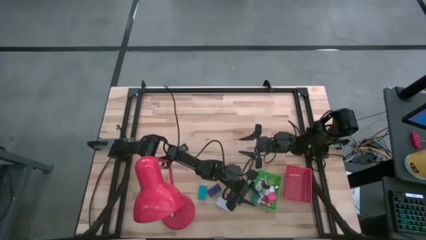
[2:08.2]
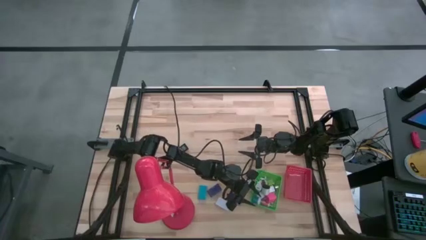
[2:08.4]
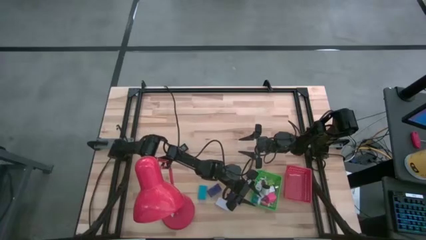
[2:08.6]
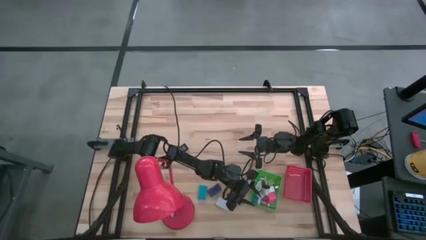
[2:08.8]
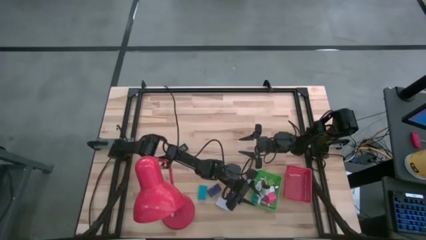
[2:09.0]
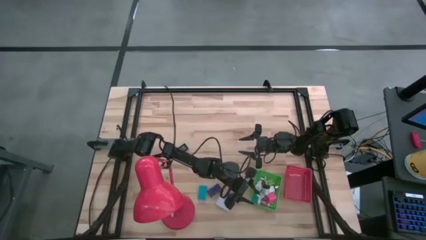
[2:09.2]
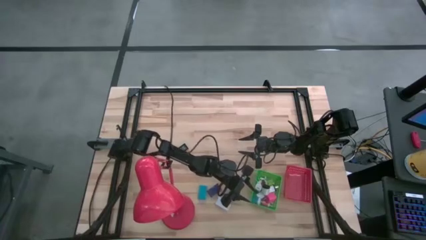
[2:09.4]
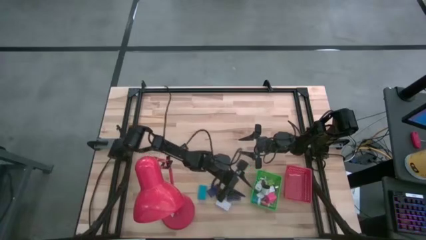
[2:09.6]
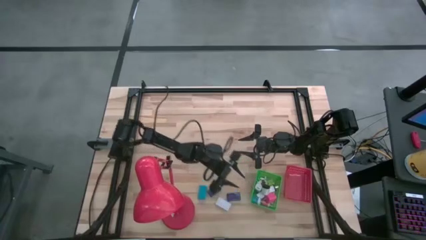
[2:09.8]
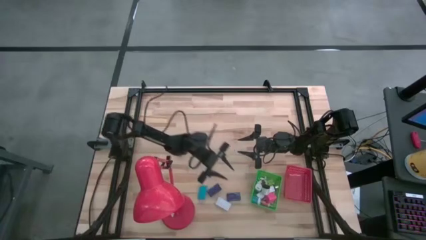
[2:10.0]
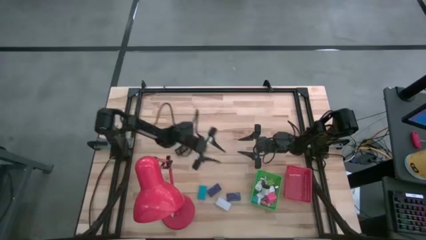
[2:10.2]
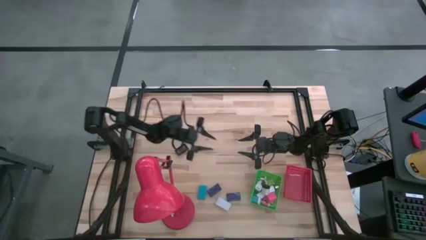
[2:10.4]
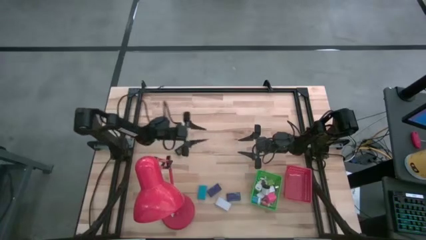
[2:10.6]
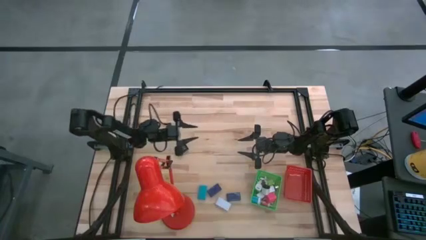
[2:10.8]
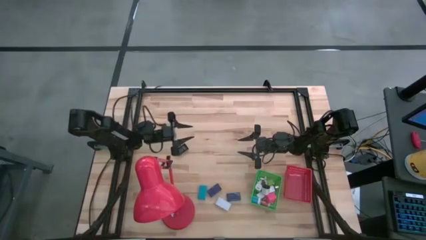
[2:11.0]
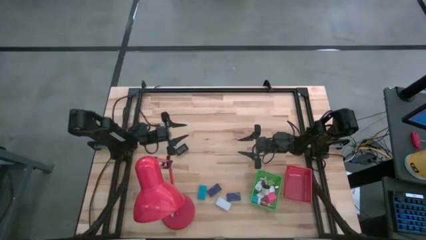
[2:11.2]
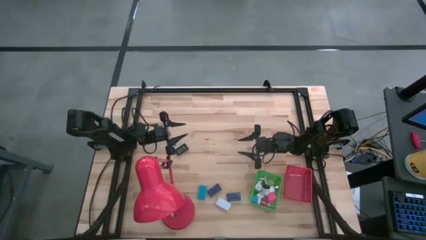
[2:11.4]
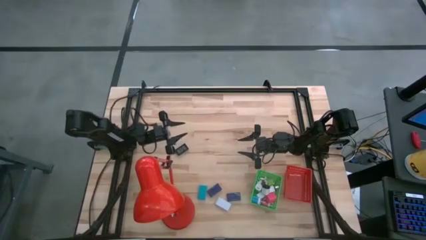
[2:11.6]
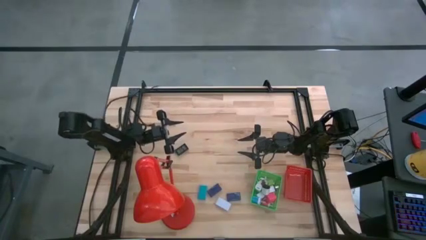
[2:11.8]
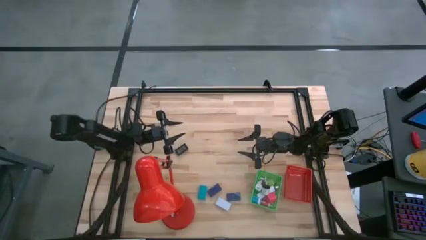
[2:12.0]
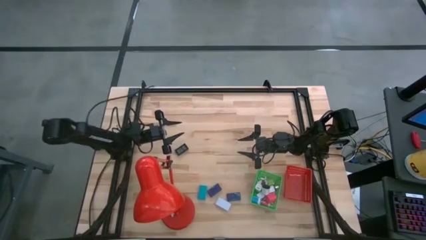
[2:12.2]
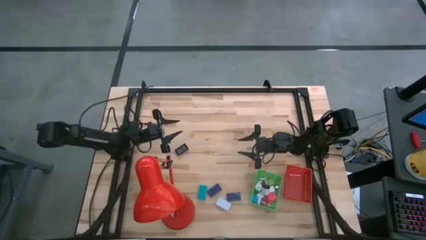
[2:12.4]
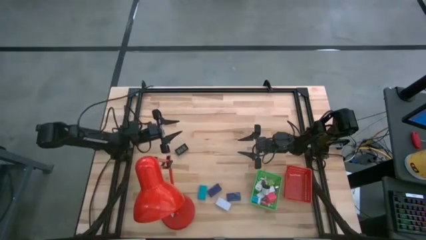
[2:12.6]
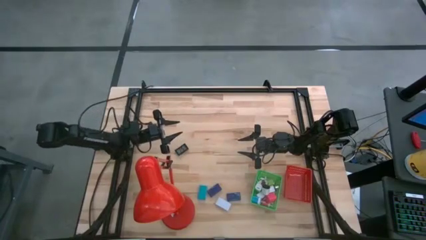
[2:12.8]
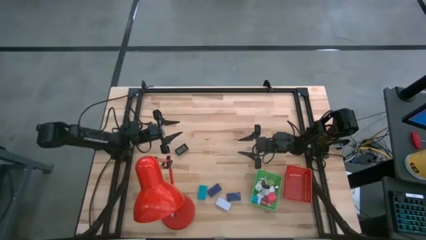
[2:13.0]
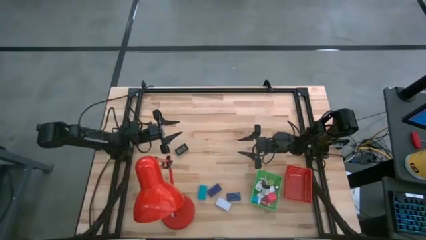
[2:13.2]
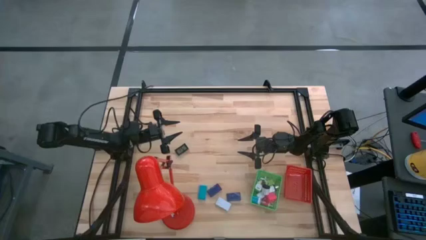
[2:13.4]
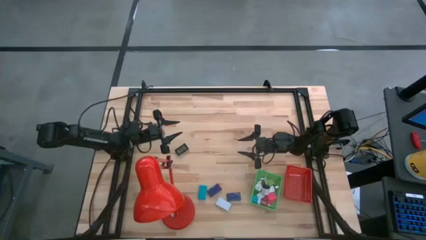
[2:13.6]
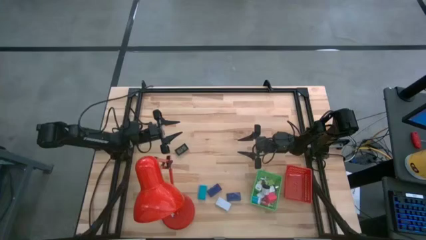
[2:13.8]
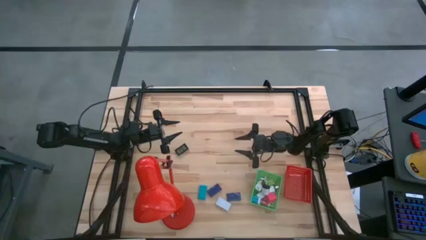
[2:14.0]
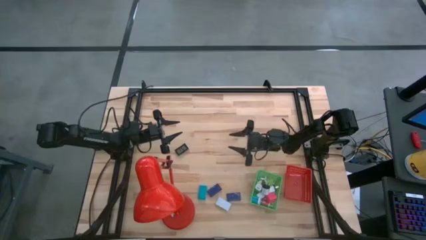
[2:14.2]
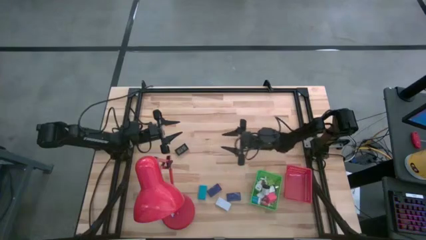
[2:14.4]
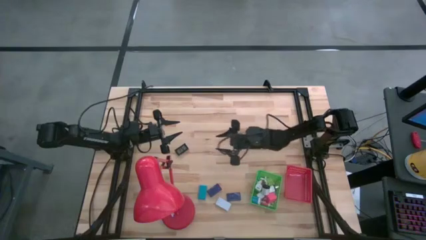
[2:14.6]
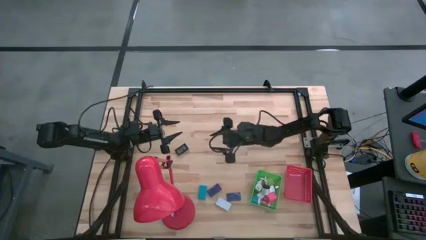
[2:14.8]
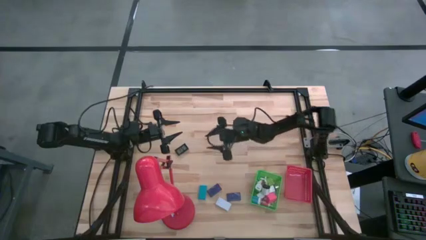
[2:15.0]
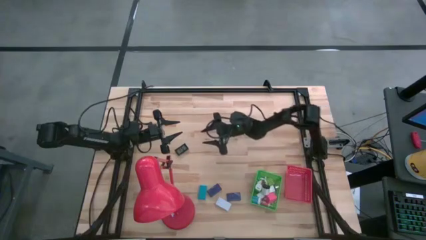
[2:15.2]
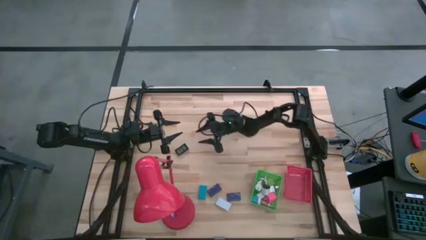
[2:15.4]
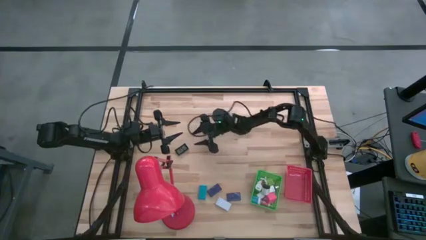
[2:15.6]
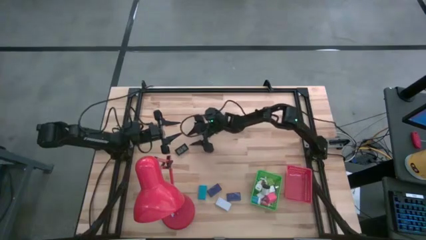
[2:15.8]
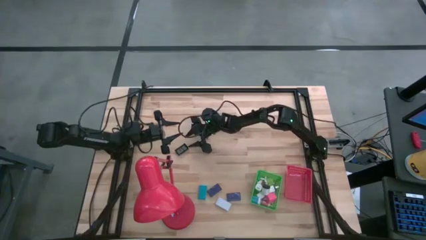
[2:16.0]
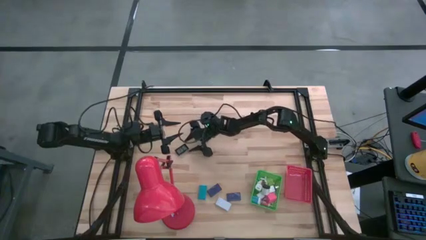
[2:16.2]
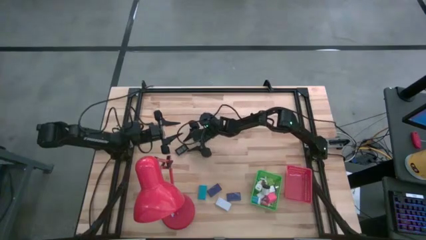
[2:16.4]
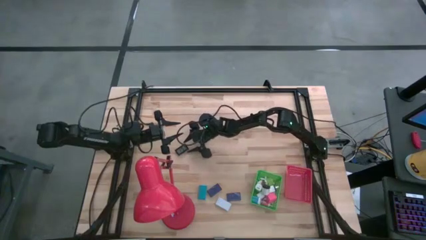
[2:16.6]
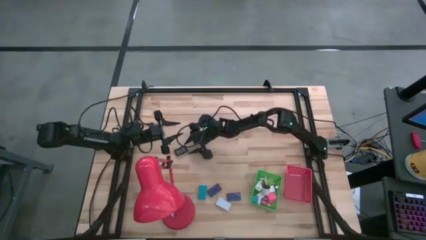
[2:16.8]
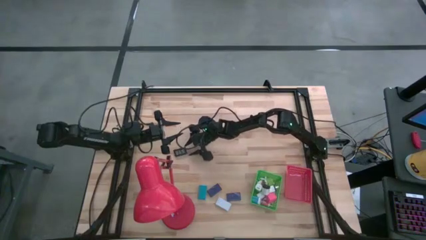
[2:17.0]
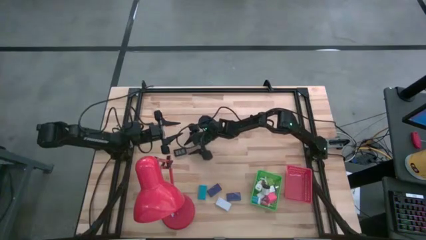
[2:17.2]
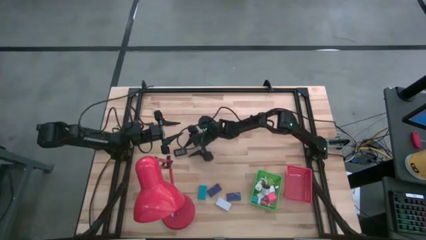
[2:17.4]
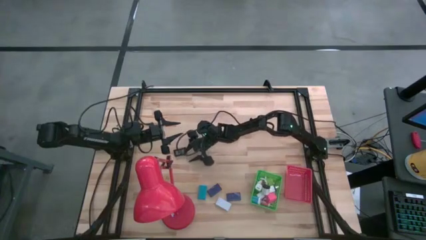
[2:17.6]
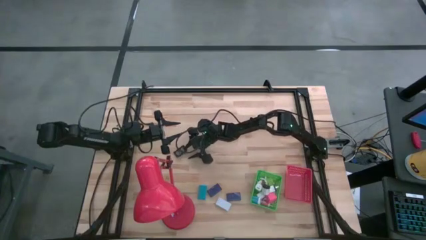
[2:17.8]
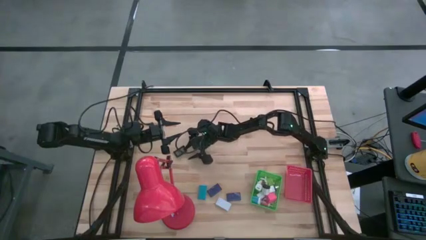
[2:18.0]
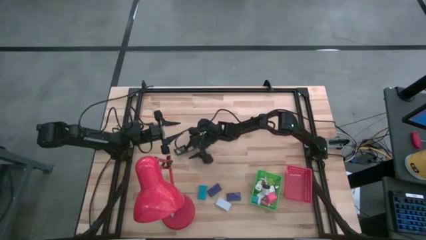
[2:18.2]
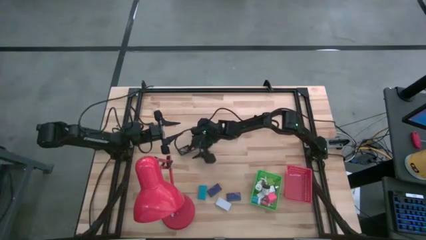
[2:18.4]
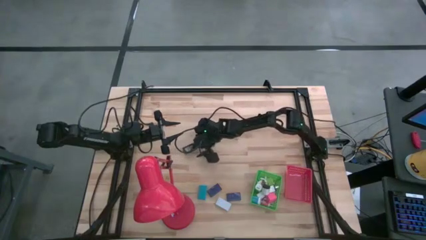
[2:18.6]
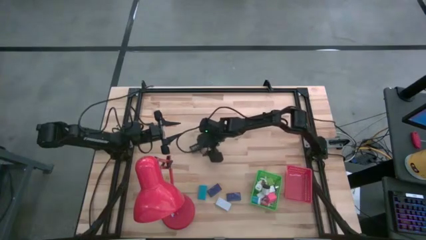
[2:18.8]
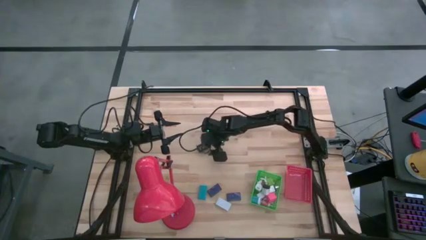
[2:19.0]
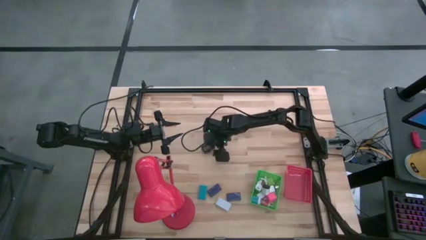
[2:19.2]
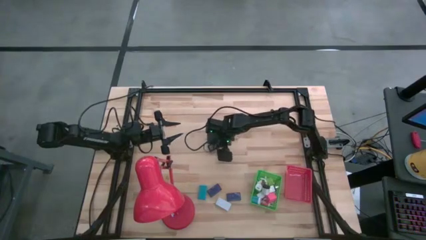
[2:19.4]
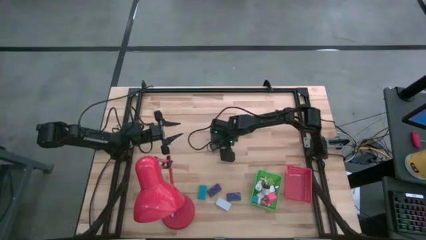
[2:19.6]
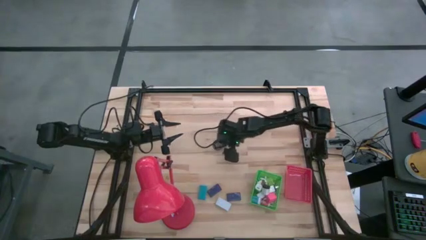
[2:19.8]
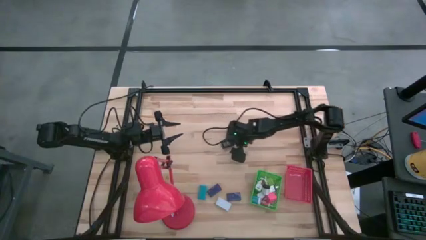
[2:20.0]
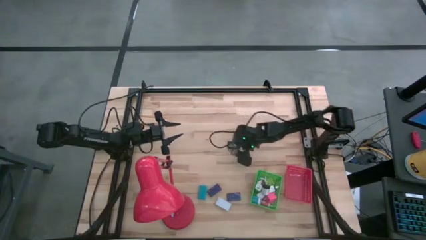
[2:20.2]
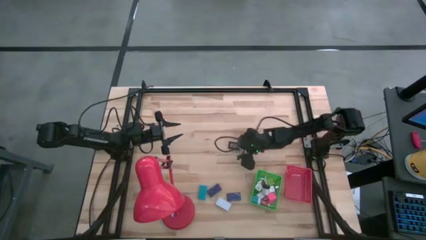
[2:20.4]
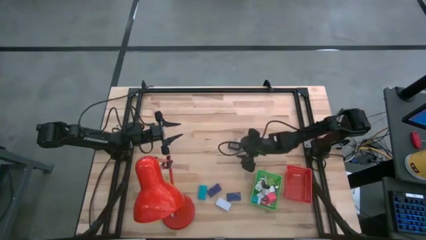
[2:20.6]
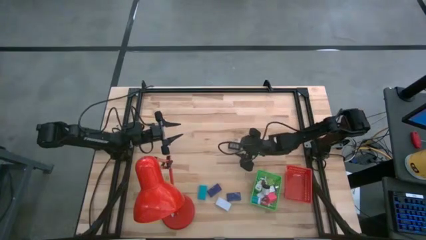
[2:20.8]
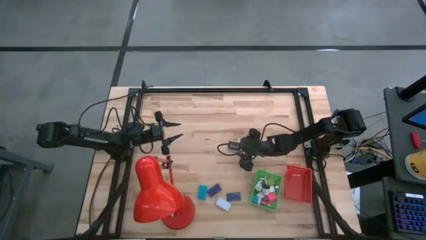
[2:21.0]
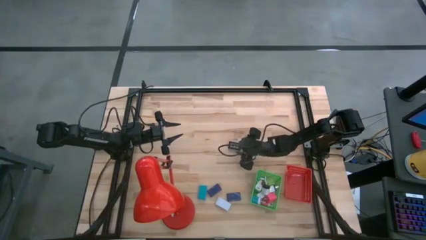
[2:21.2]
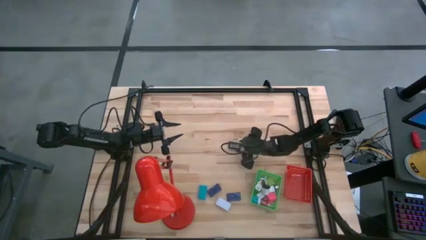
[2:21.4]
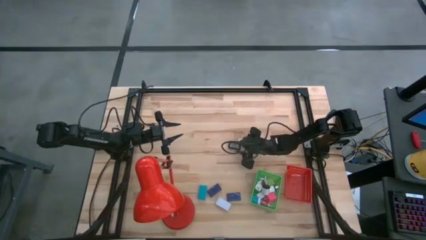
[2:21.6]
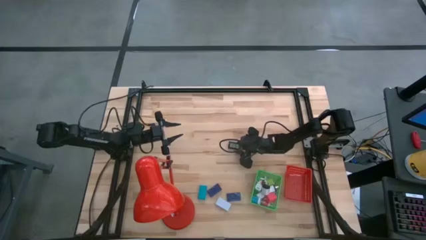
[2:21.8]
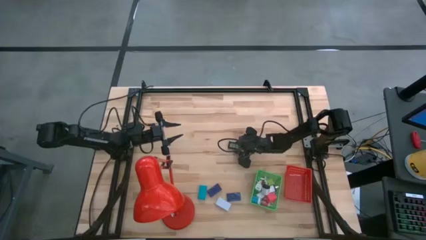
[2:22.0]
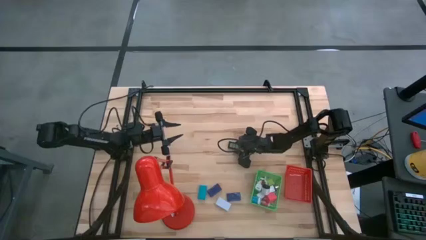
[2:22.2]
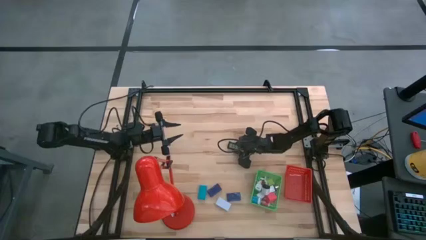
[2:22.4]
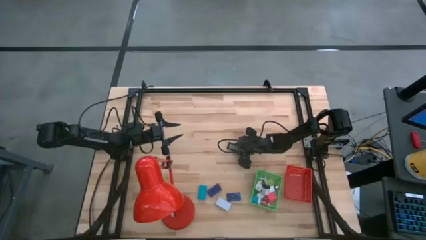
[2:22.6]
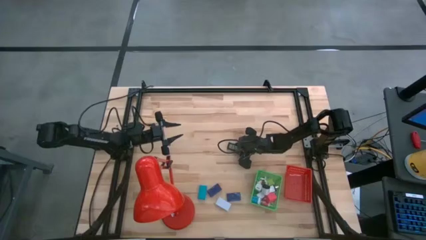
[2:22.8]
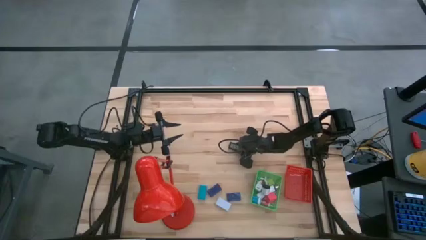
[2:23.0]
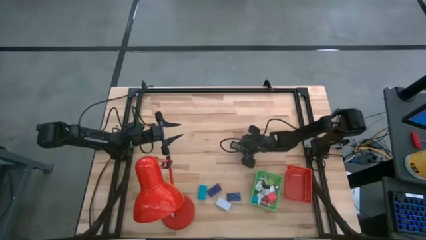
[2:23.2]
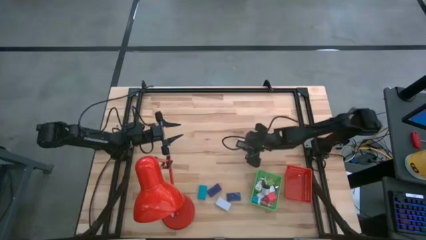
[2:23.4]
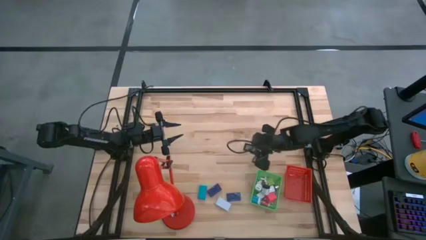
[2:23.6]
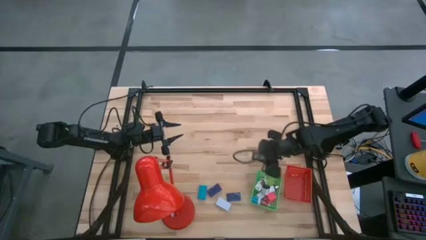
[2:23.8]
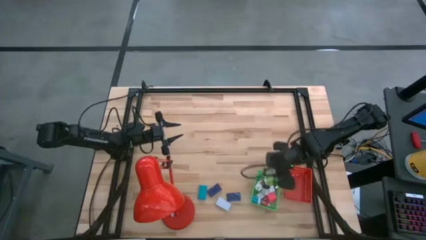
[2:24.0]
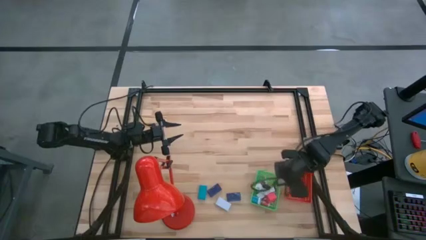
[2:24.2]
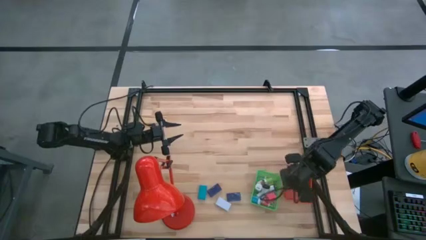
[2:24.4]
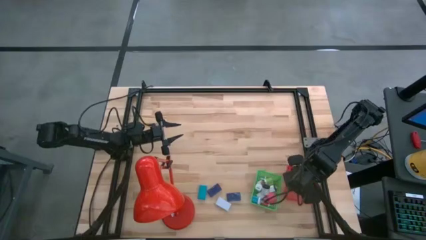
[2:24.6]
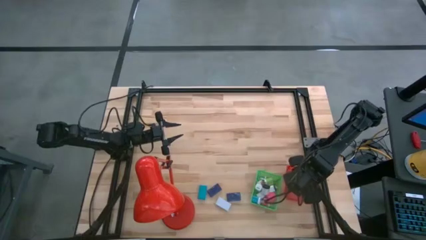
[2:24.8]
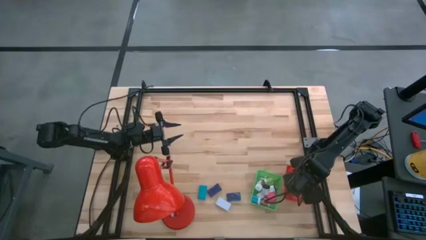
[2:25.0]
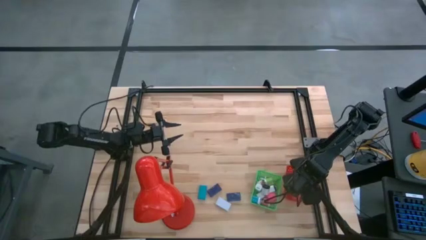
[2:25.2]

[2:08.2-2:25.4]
Task: Pick & Place Office items
Put the black digital clock into the red basket
